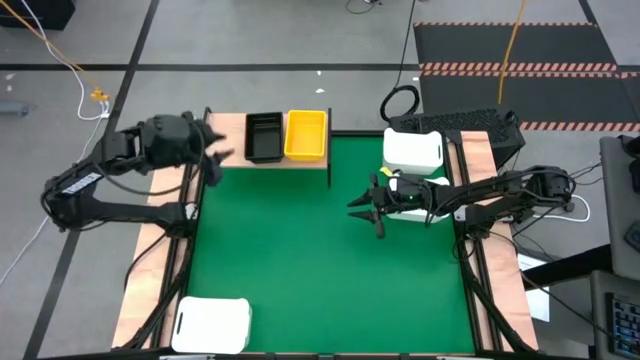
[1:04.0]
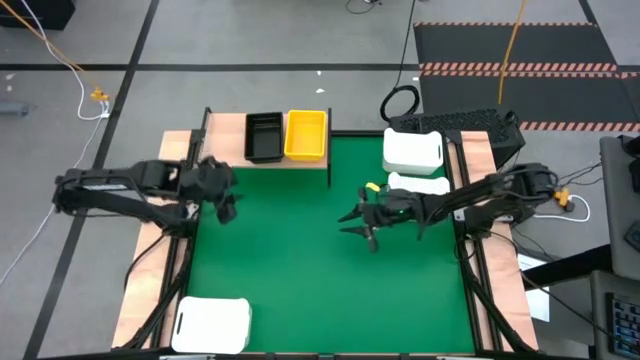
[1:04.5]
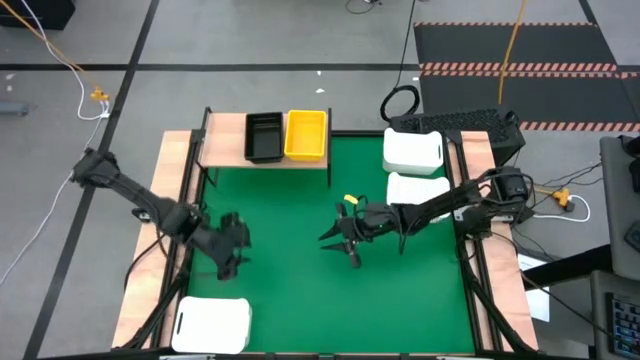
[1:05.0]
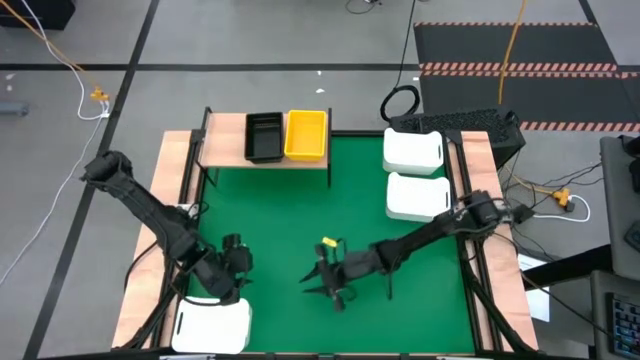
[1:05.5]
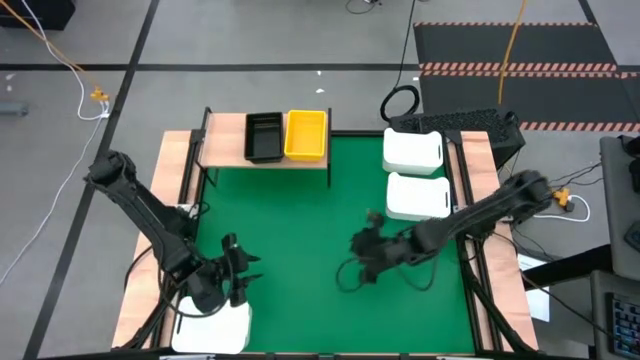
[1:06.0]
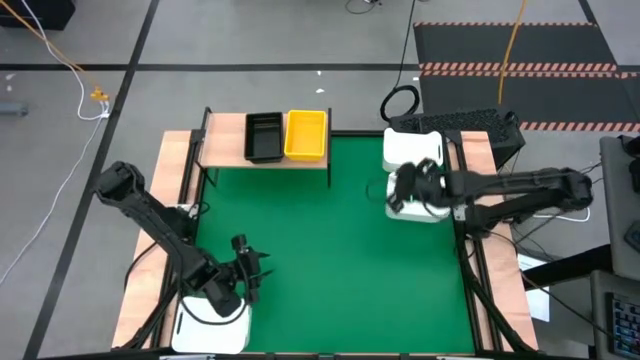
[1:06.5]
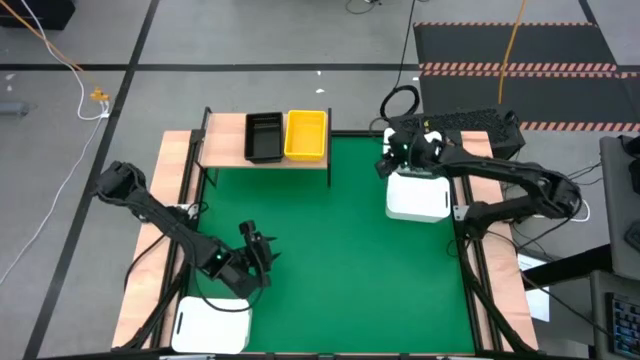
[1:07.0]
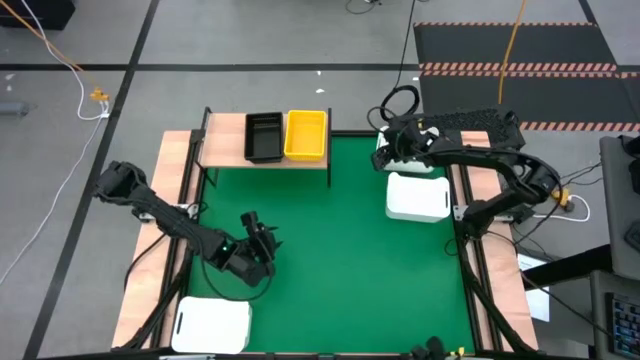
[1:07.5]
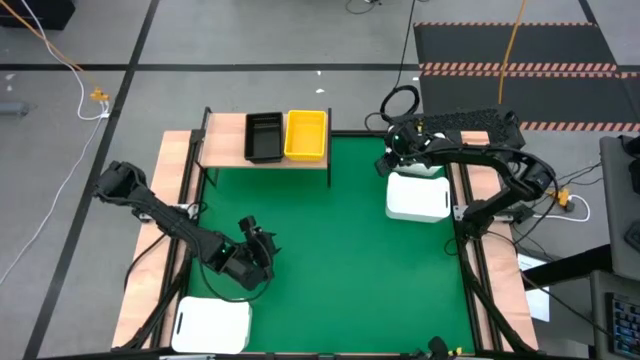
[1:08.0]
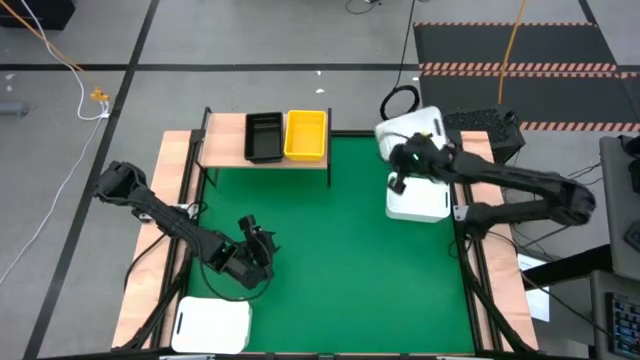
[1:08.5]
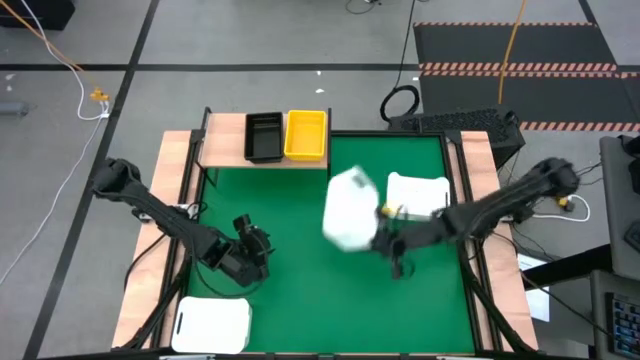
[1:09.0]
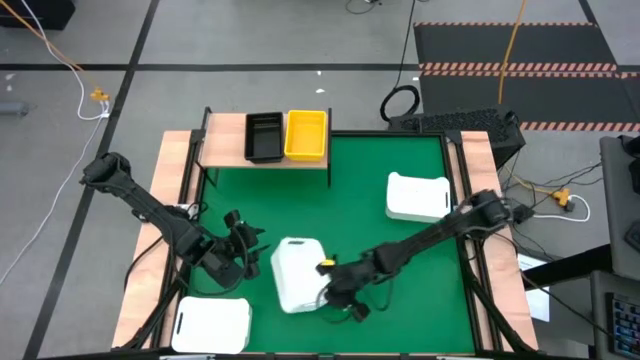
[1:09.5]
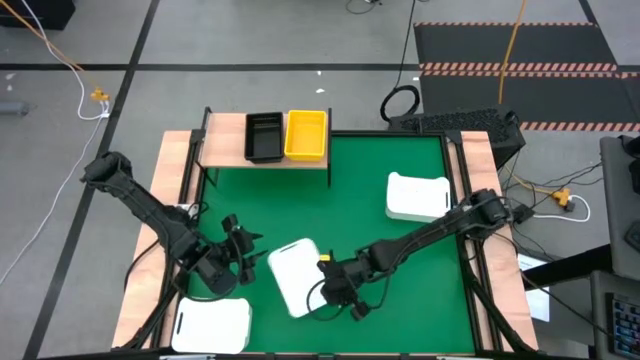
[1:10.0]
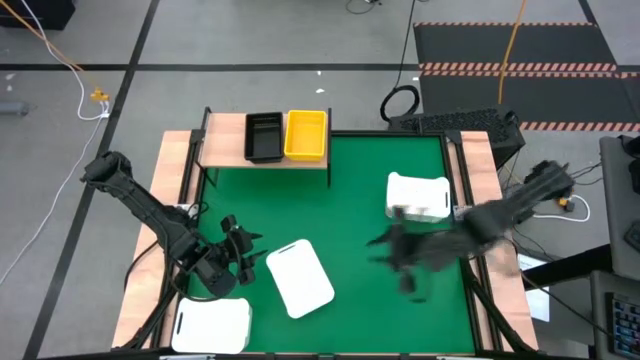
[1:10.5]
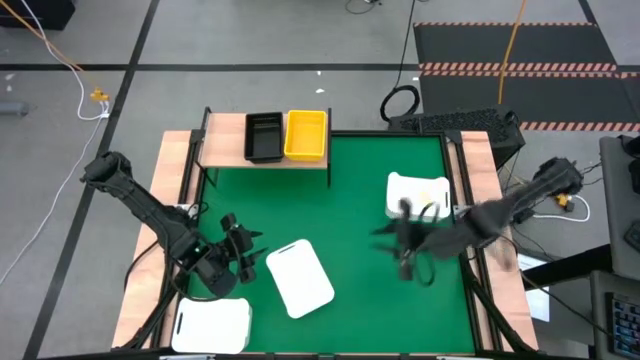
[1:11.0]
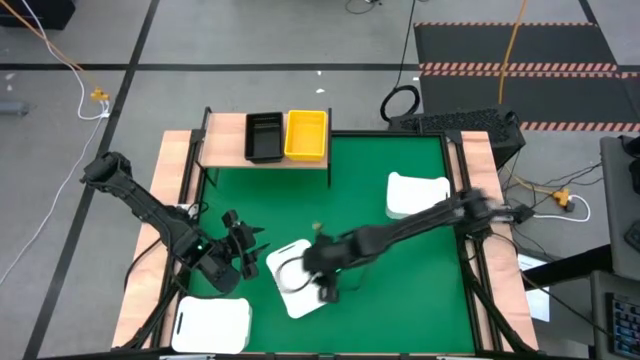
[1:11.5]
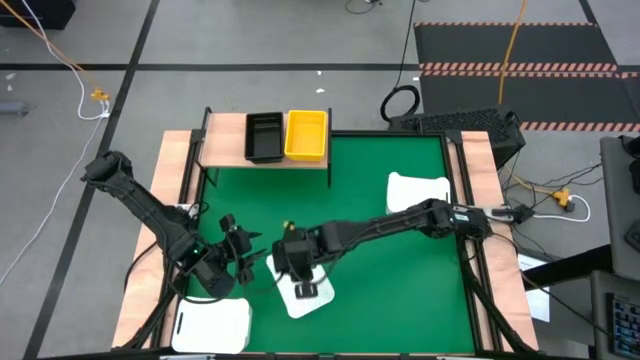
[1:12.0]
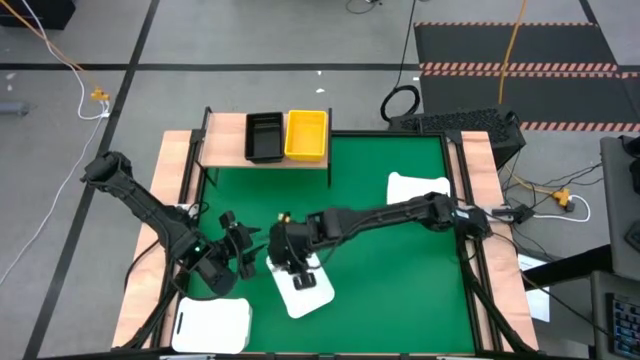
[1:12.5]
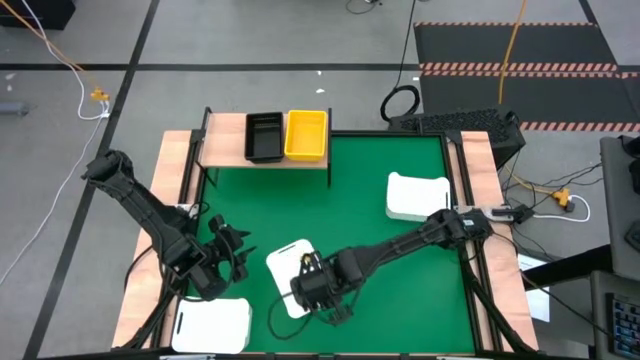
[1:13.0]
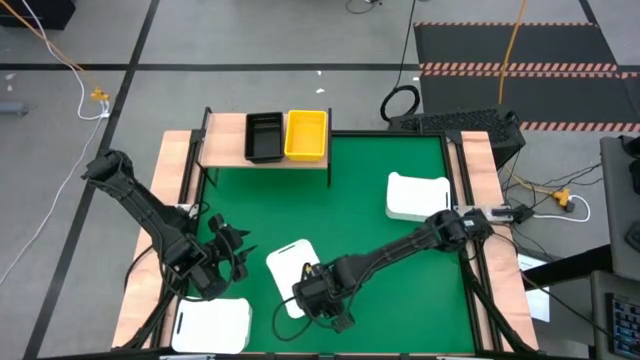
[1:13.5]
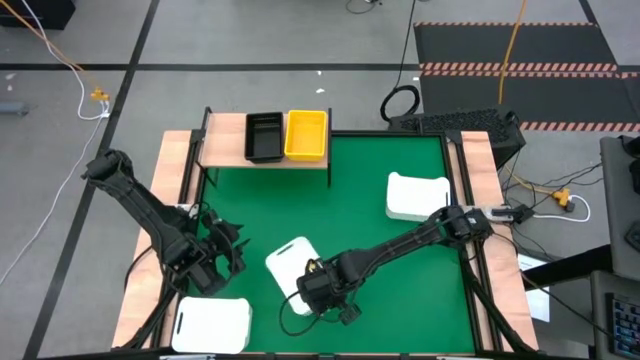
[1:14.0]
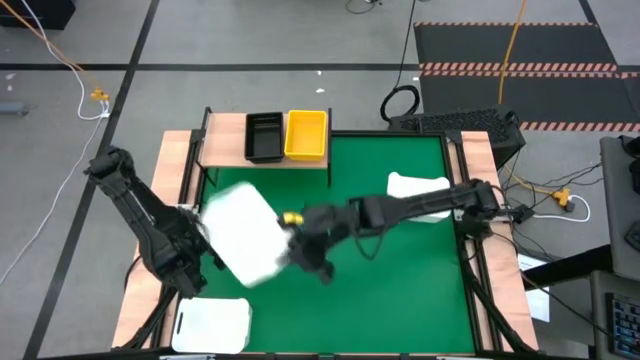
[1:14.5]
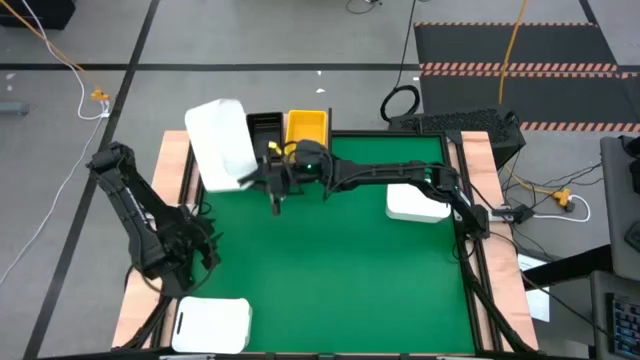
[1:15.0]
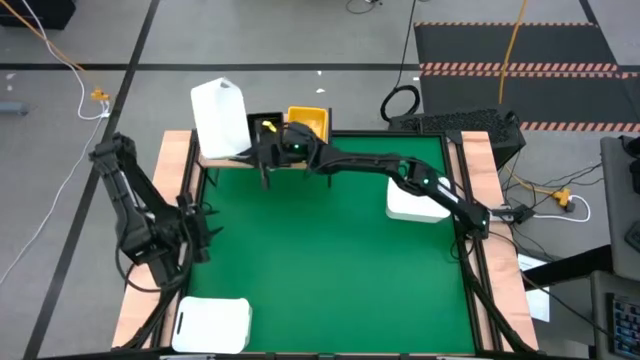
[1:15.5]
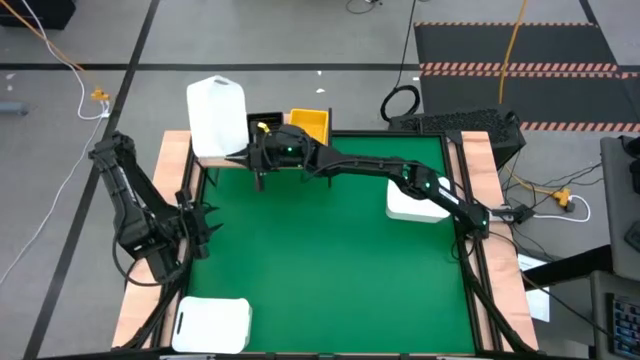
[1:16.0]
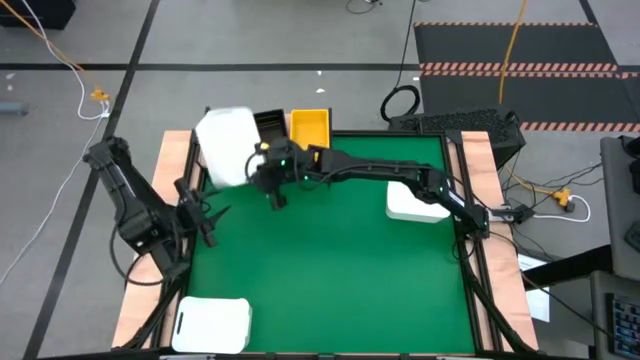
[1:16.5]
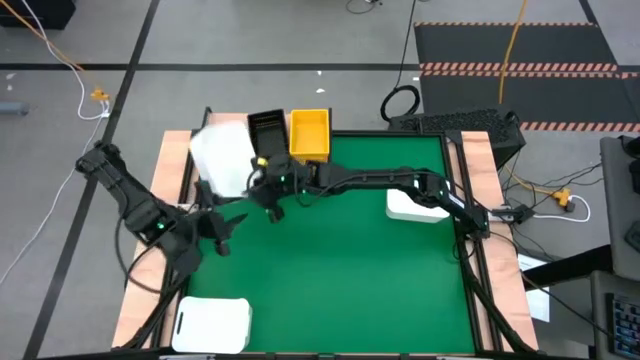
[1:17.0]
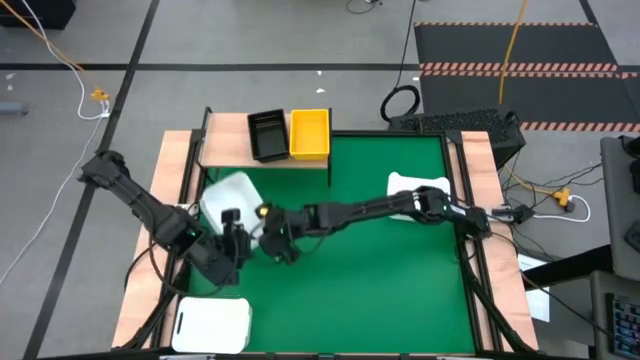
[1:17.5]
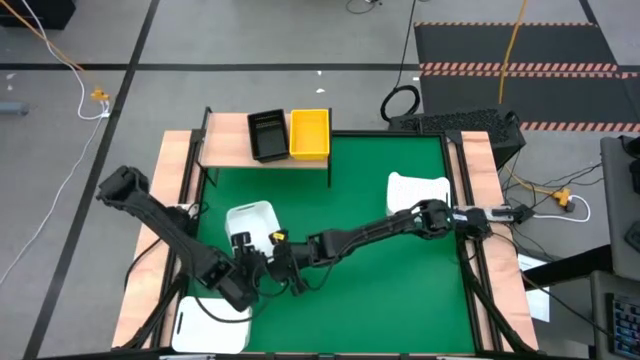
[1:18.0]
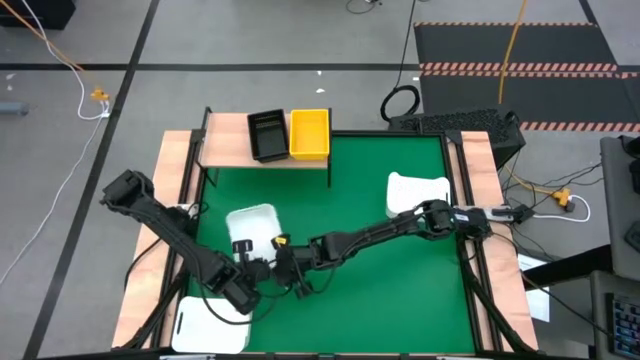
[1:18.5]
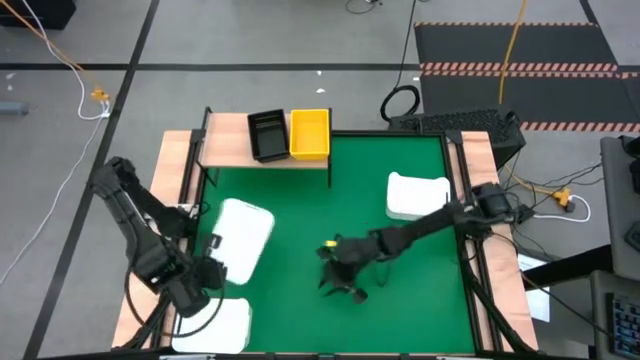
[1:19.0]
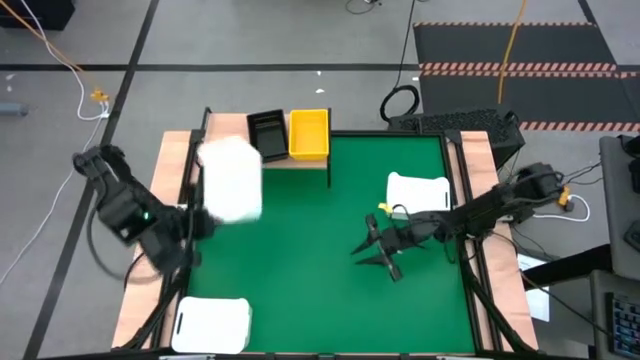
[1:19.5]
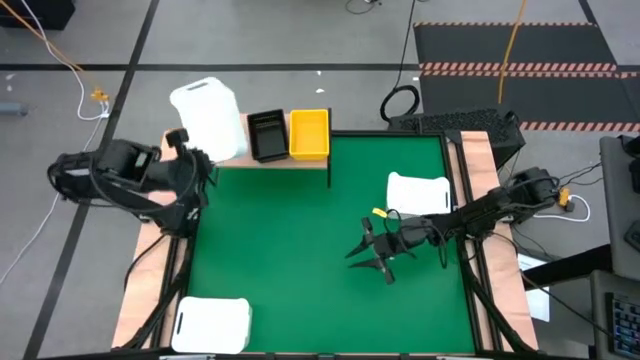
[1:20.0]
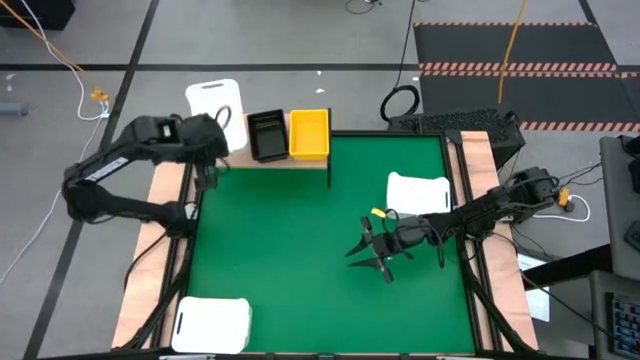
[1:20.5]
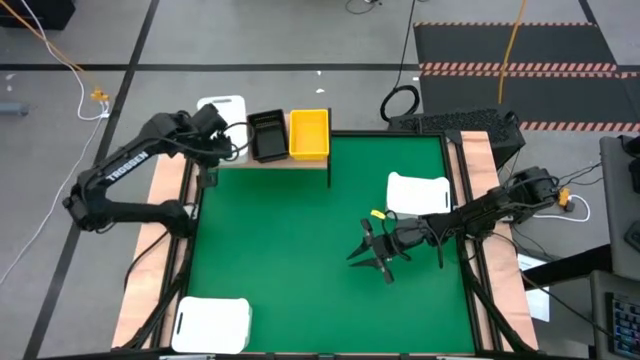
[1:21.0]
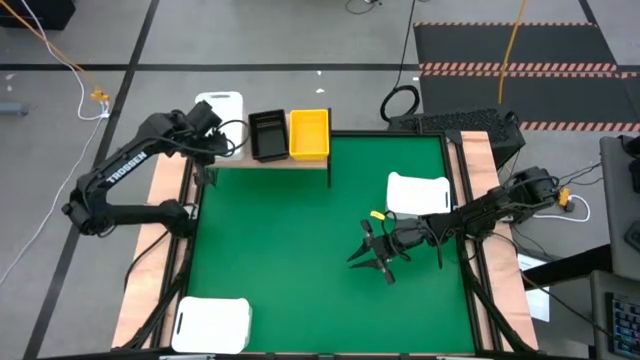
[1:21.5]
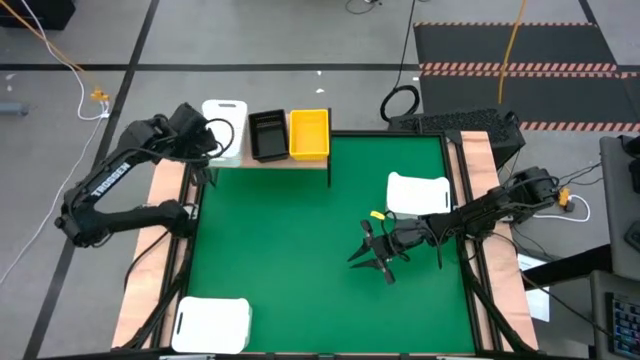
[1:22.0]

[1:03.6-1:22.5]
Task: Stack baskets on shelf by color
Put the top white bin on the shelf

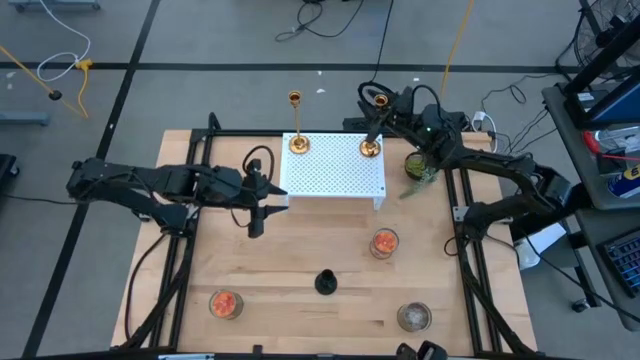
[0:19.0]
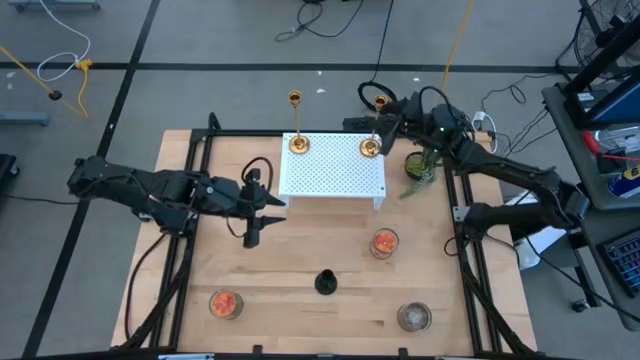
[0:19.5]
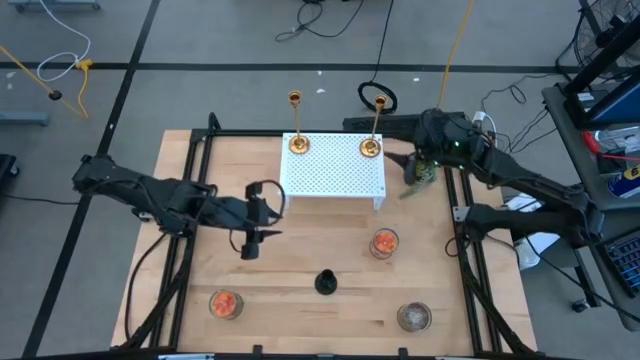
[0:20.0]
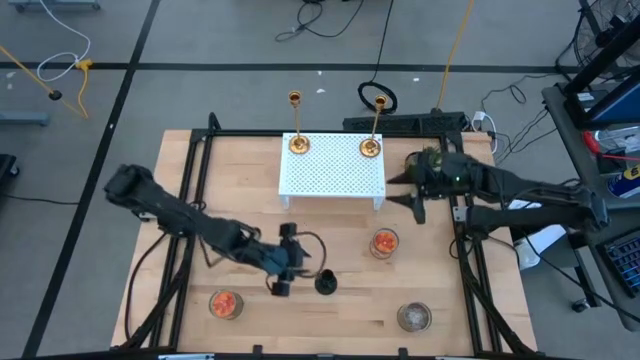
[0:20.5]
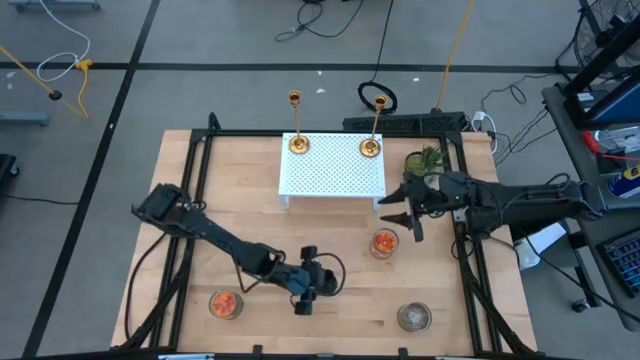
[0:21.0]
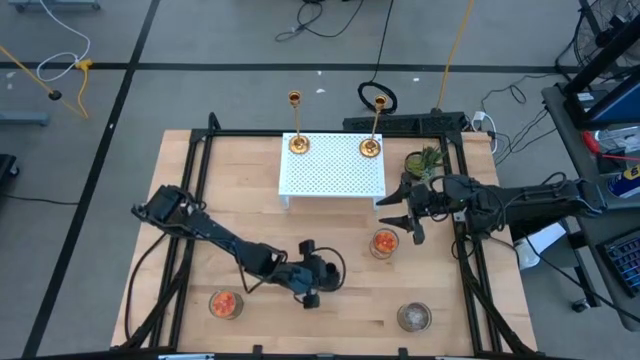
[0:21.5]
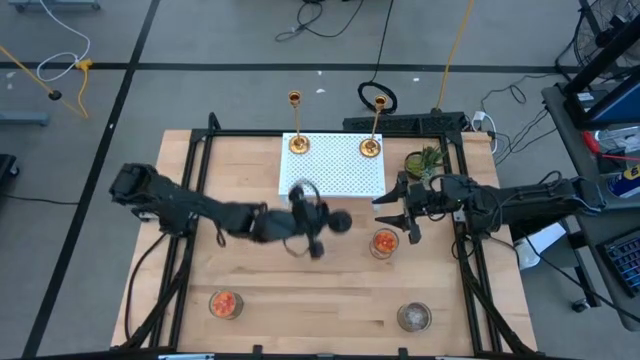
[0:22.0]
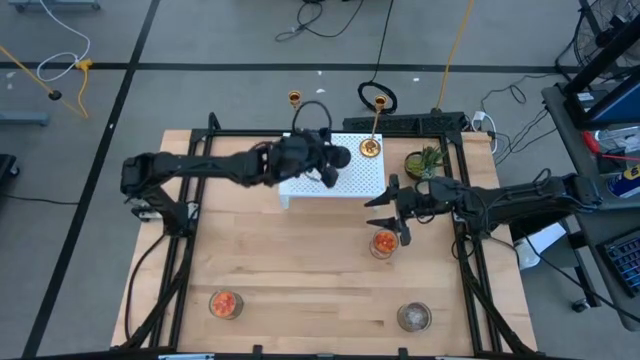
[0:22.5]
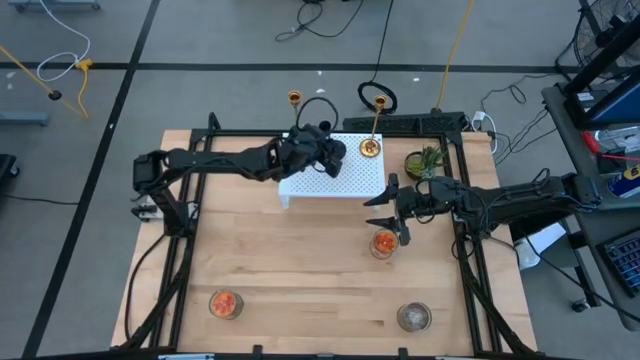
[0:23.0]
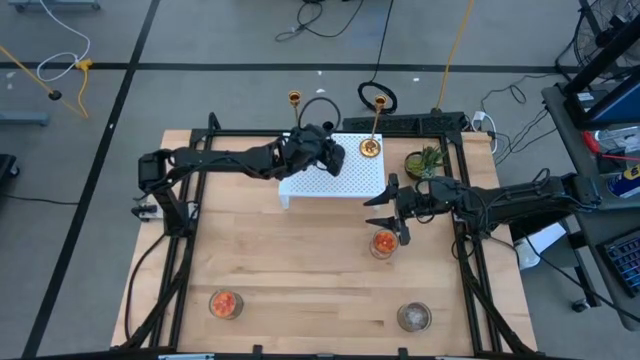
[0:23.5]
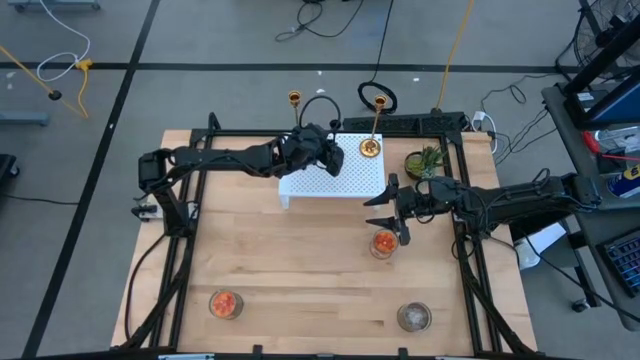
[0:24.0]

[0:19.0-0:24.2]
Task: Pick & Place candle stick holders
Put the black candle holder on the shelf
